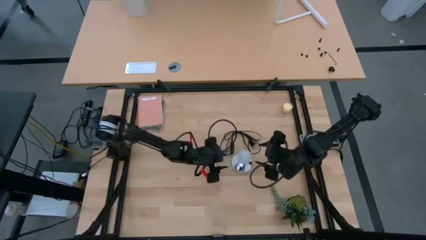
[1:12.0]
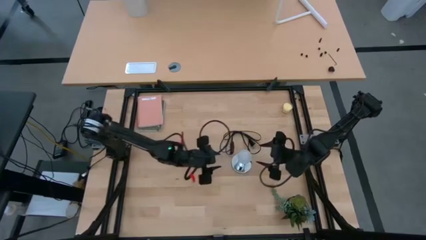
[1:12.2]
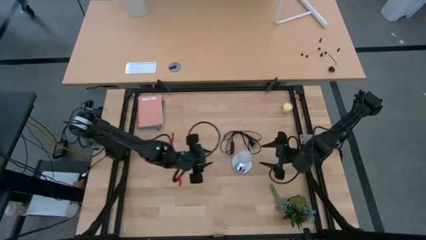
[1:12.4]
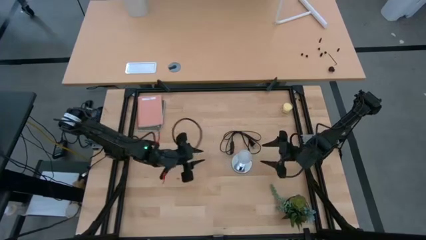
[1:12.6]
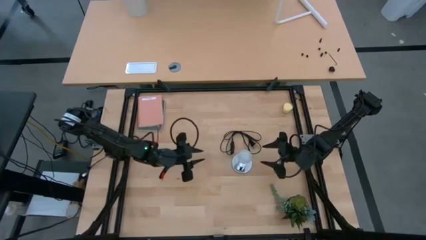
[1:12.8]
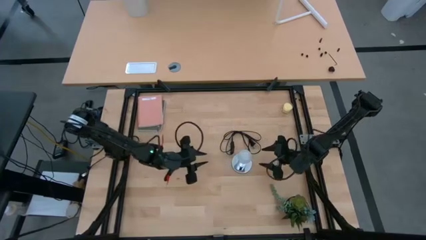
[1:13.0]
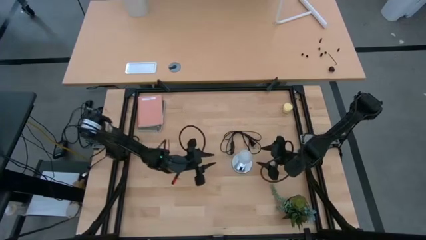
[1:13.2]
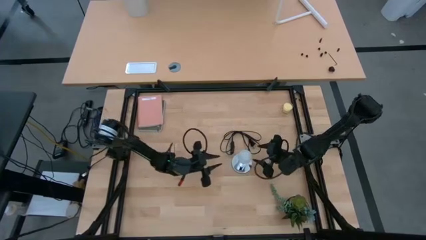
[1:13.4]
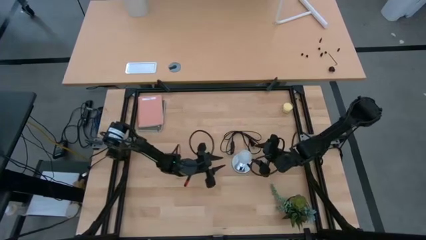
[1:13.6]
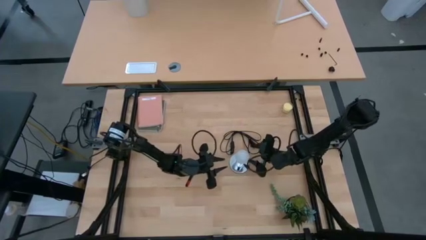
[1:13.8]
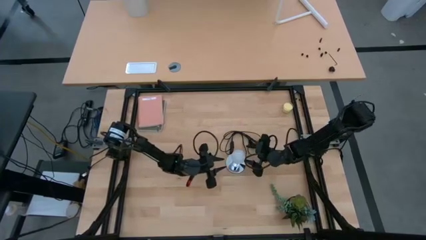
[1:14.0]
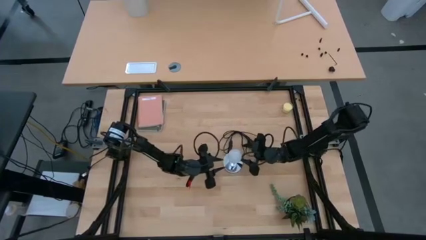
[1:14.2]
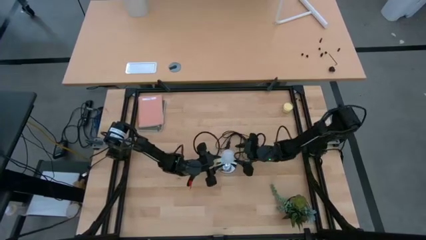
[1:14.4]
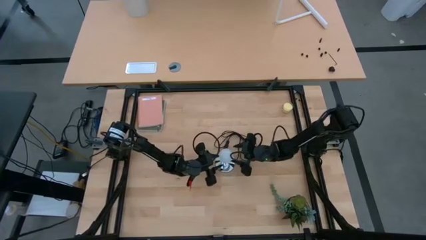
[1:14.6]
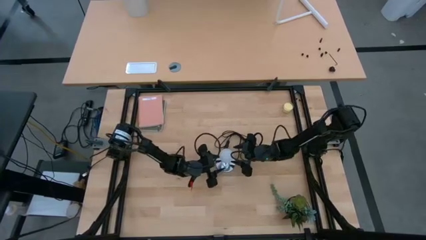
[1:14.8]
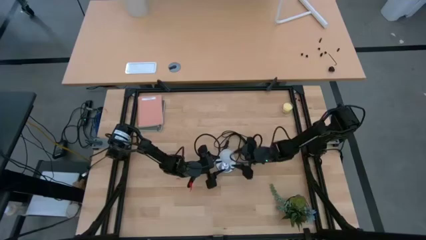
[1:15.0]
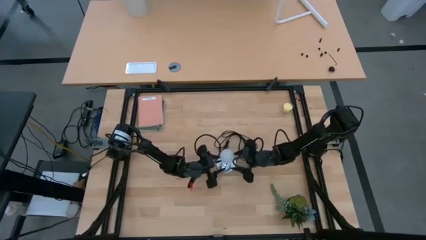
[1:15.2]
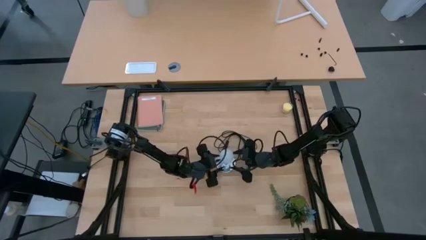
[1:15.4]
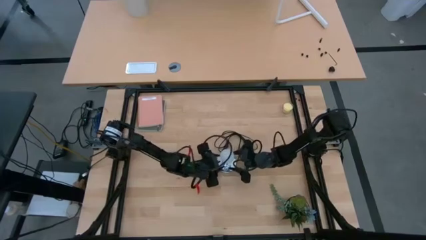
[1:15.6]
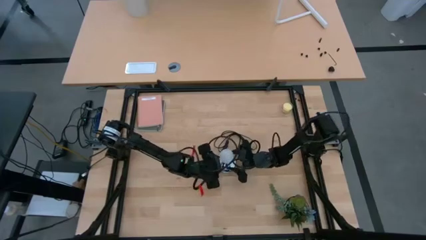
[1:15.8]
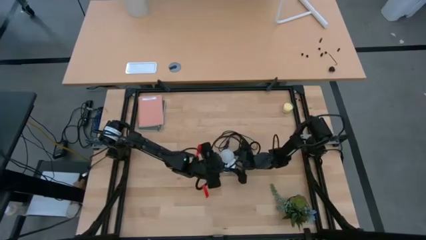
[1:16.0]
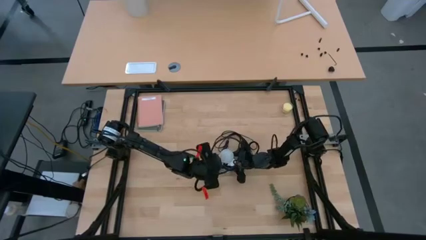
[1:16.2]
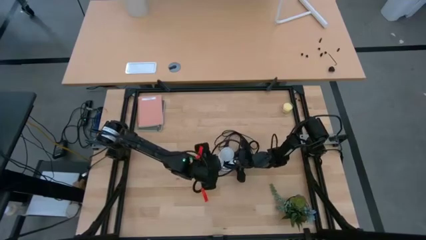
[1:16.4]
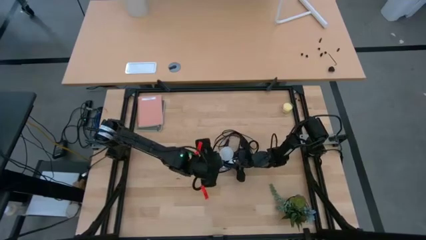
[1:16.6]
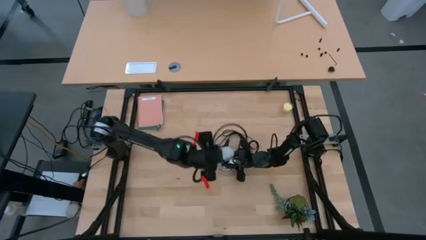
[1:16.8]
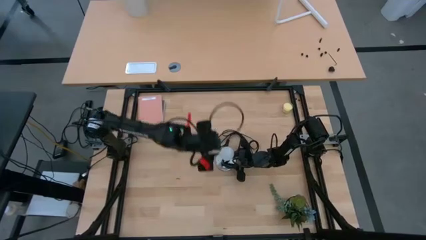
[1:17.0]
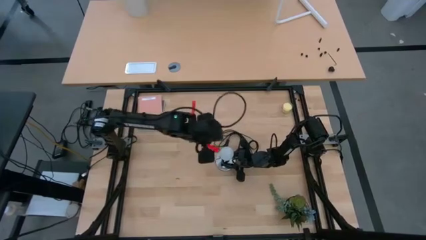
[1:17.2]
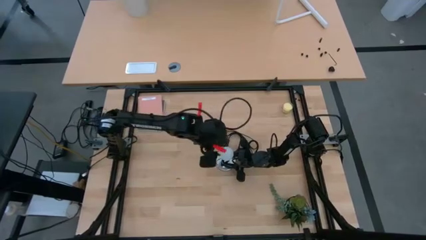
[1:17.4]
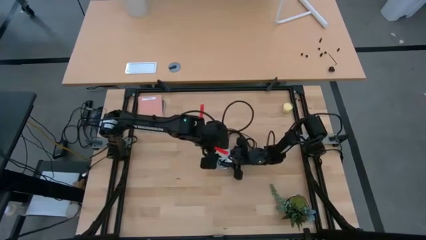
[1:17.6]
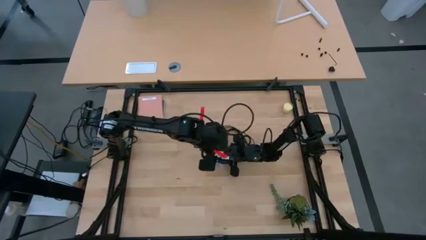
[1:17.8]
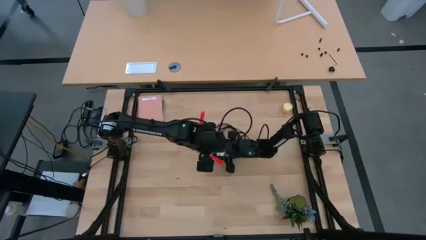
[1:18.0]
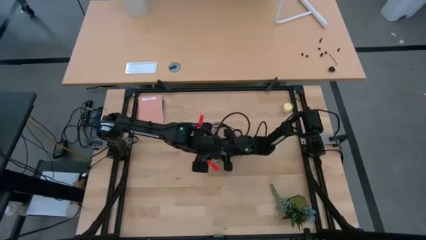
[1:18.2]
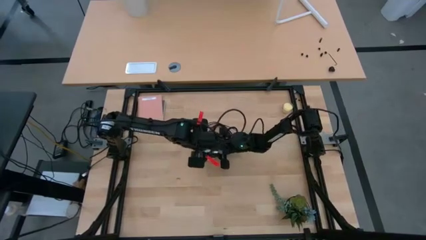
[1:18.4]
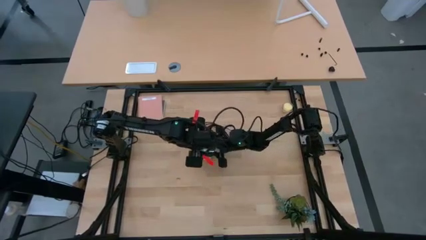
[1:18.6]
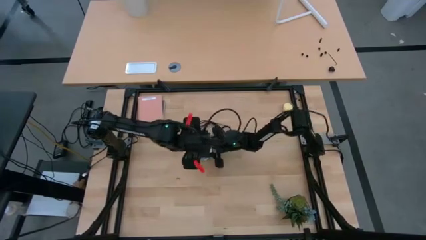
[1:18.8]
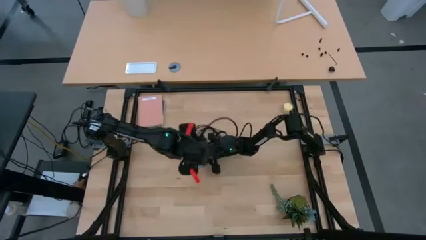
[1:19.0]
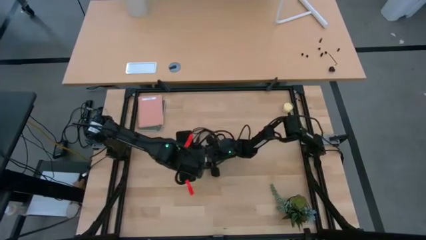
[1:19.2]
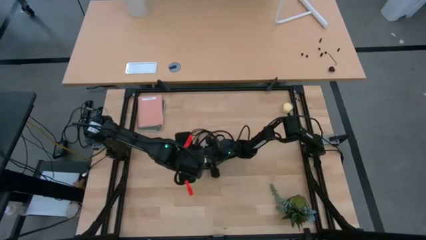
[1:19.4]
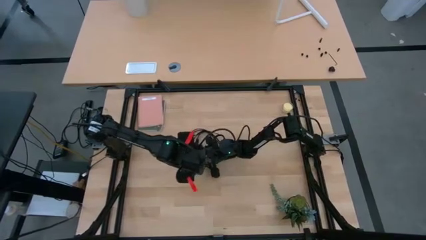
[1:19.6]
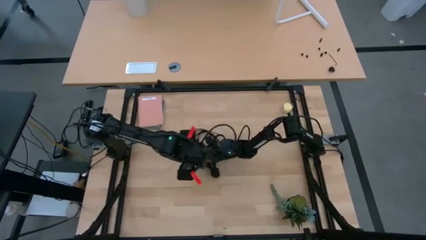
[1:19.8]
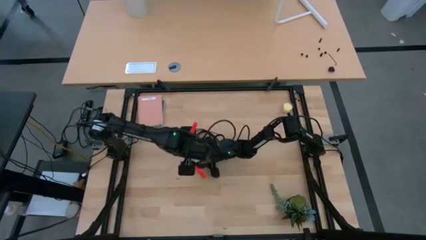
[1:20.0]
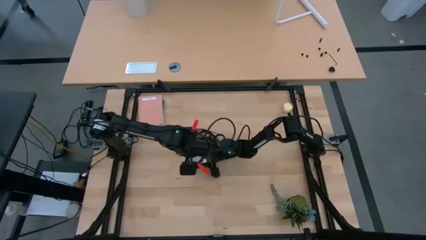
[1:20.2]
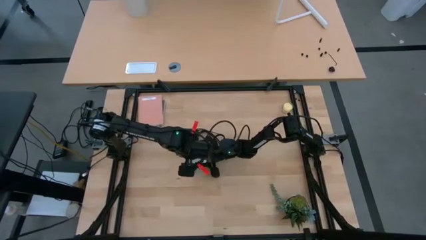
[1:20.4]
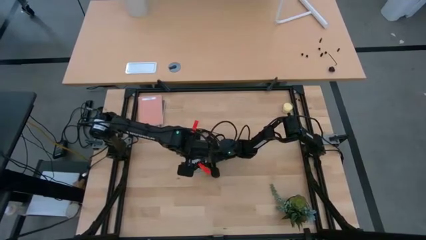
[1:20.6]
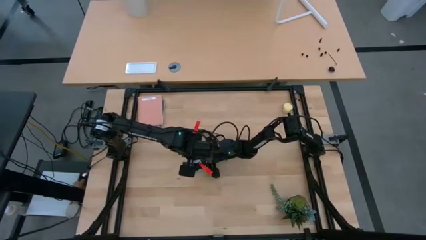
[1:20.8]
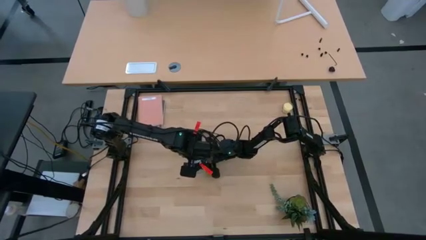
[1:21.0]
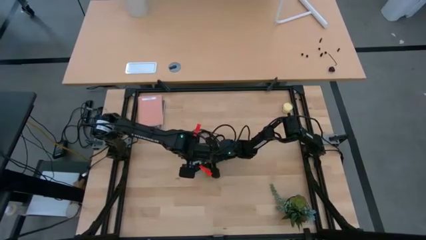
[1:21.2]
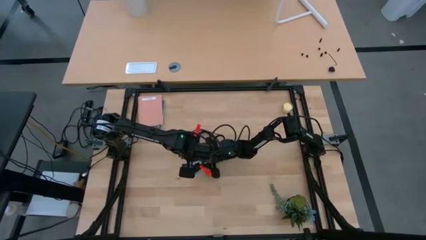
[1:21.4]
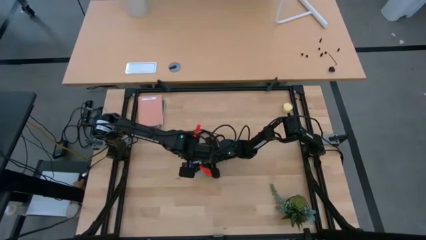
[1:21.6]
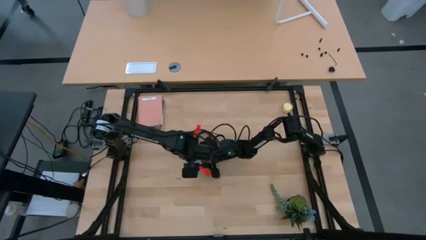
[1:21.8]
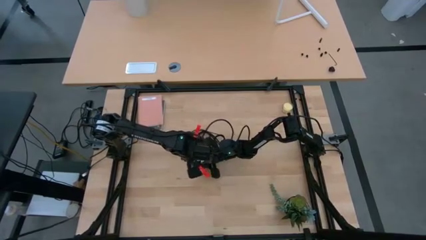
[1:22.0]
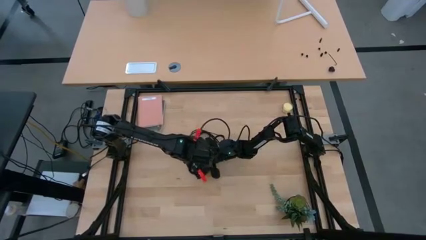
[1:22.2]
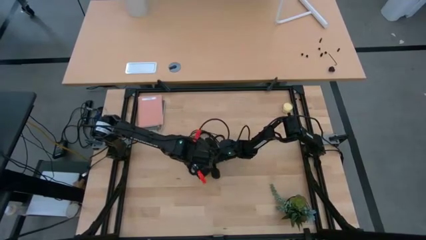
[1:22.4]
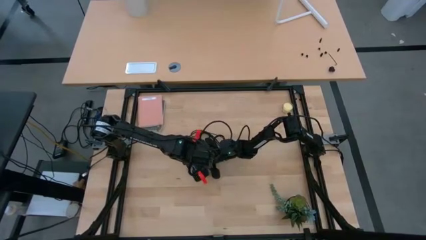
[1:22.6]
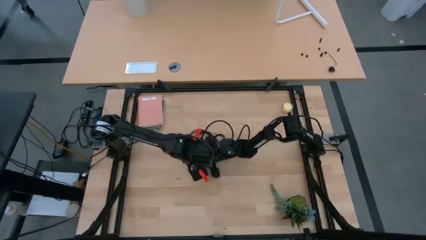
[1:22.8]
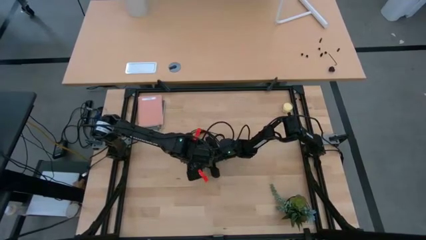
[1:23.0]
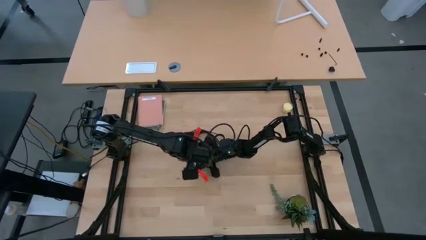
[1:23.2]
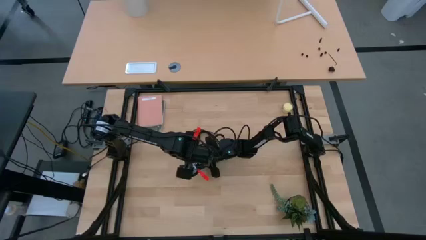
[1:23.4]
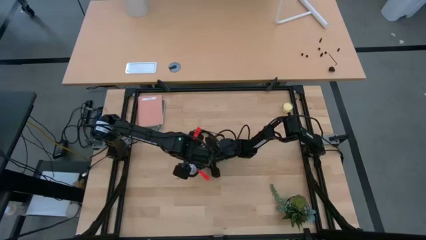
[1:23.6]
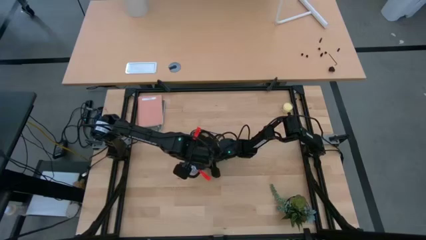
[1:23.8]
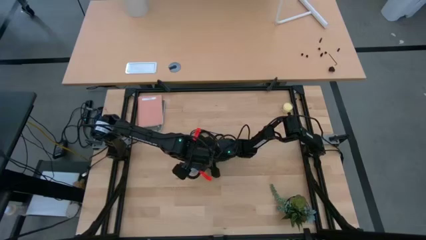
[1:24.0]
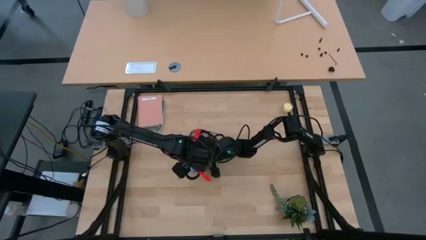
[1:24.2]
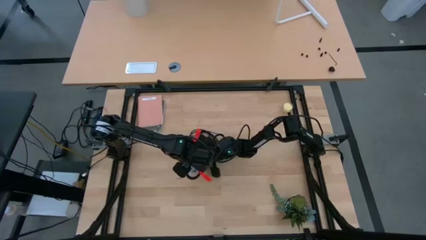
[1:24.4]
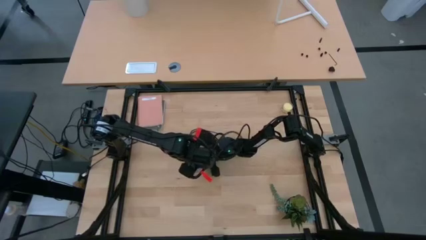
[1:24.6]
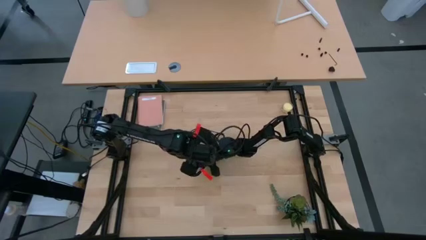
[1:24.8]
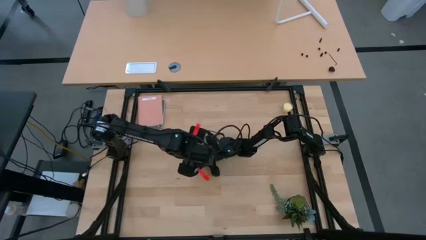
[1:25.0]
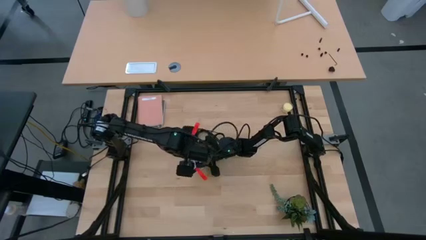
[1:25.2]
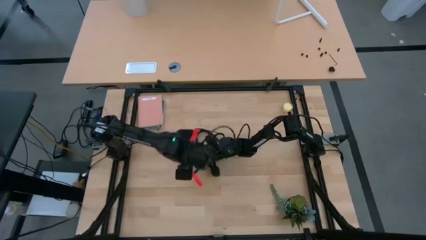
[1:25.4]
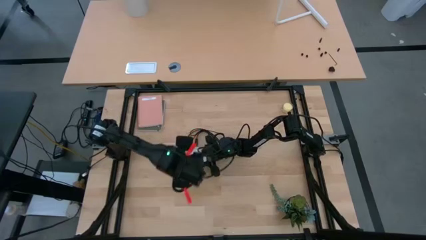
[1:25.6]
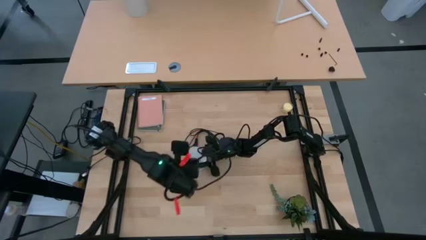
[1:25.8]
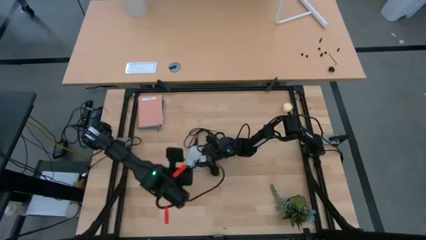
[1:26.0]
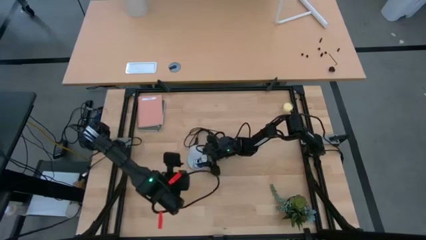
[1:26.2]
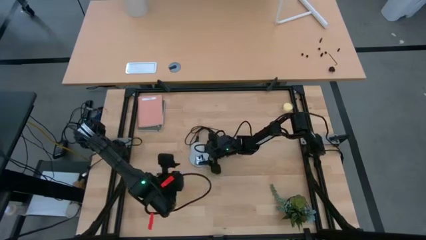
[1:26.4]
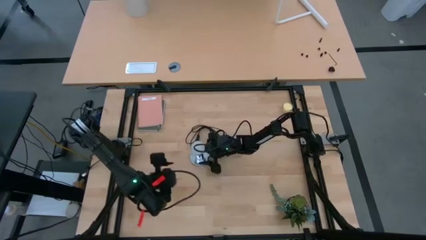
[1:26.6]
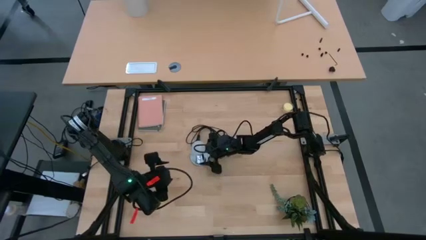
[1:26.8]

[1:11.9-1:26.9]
Task: Screw lightbulb
Remove the lightbulb from the silver lamp
